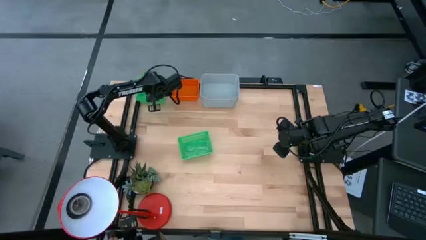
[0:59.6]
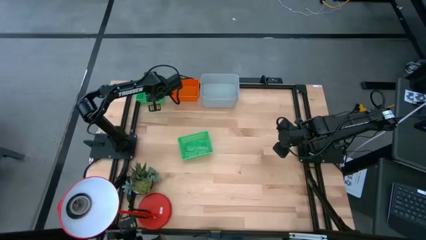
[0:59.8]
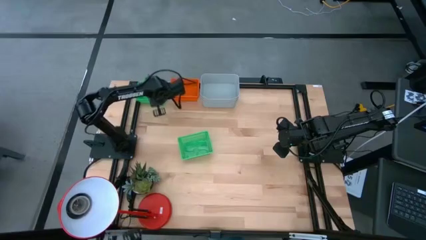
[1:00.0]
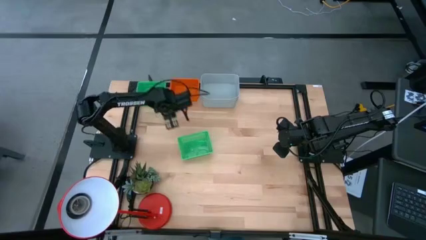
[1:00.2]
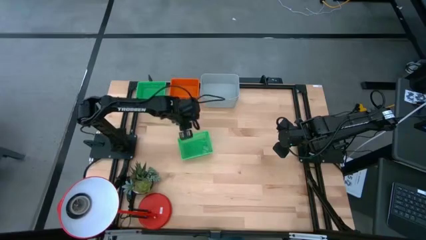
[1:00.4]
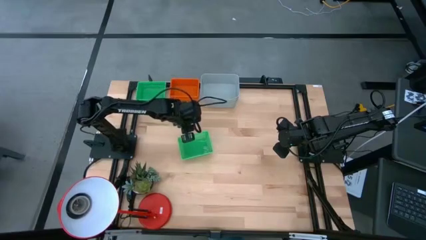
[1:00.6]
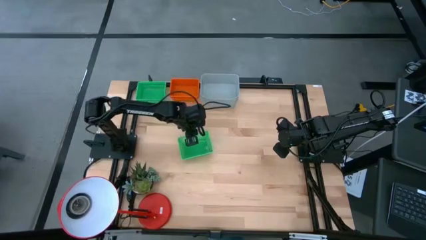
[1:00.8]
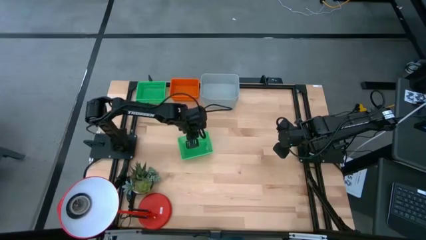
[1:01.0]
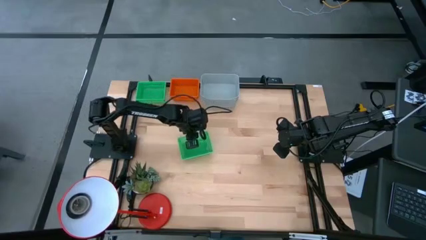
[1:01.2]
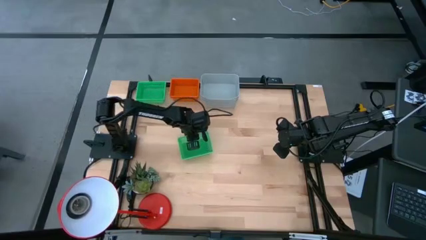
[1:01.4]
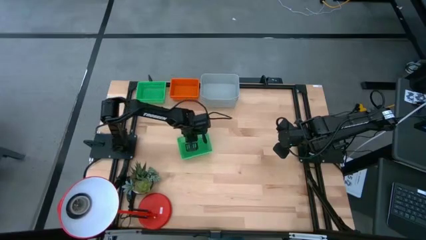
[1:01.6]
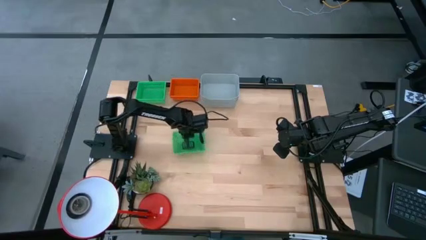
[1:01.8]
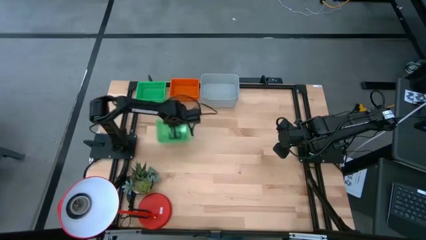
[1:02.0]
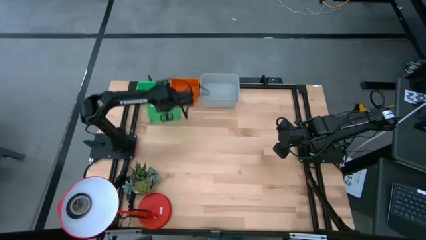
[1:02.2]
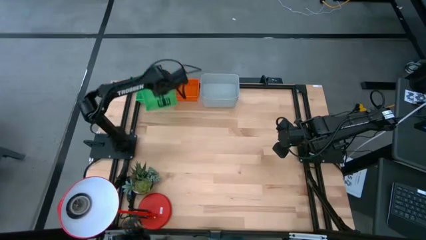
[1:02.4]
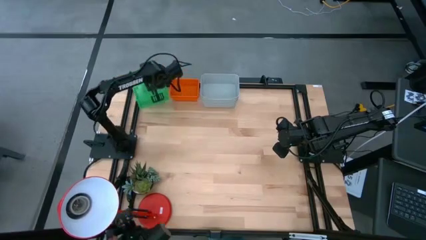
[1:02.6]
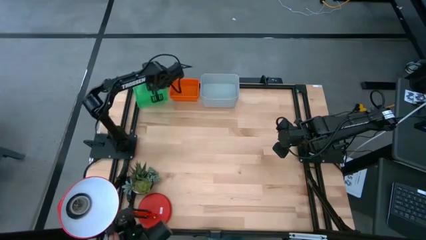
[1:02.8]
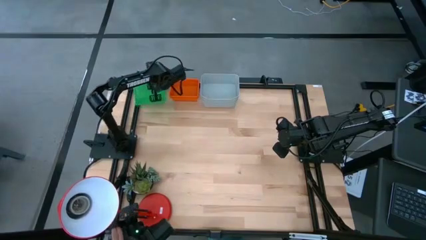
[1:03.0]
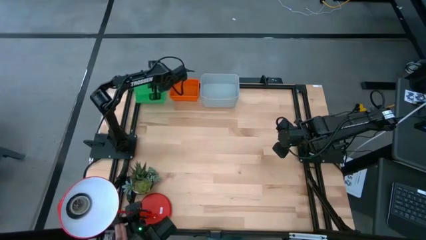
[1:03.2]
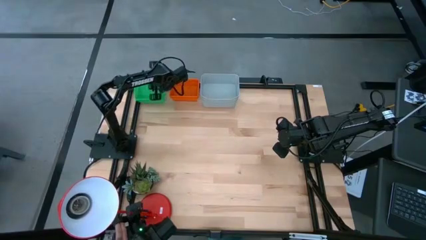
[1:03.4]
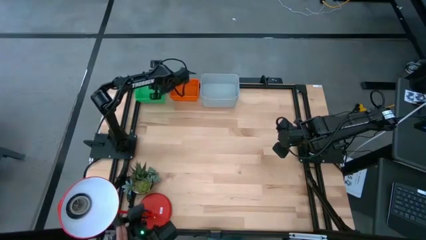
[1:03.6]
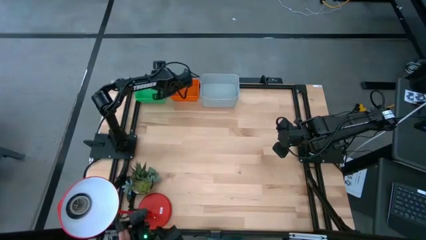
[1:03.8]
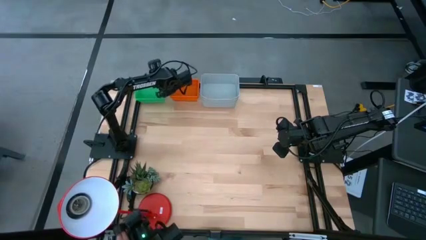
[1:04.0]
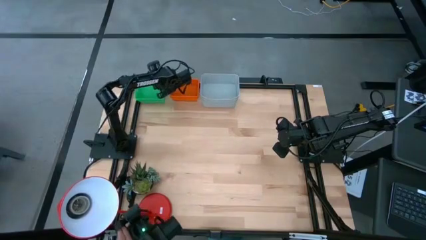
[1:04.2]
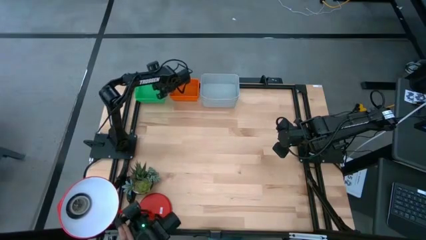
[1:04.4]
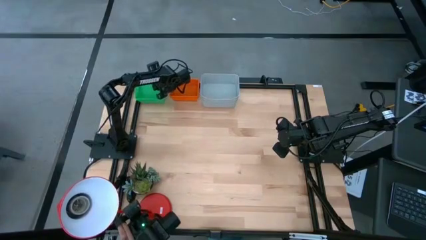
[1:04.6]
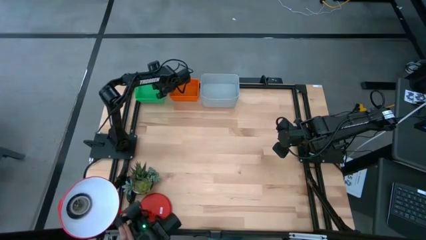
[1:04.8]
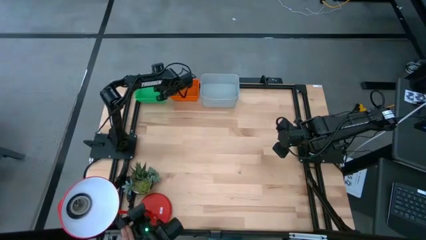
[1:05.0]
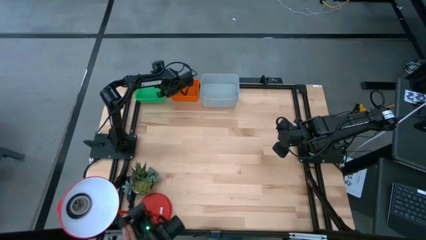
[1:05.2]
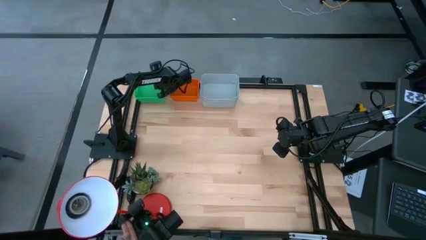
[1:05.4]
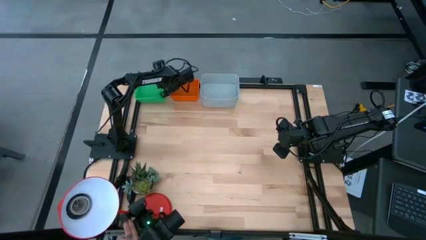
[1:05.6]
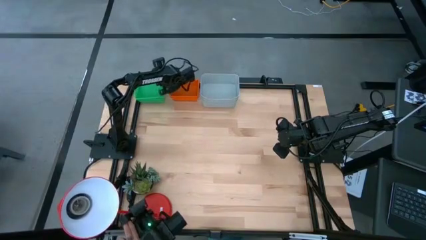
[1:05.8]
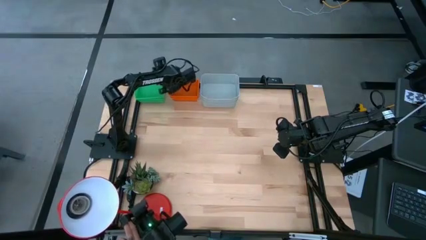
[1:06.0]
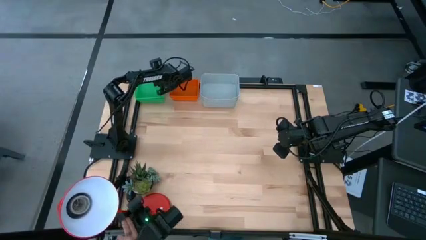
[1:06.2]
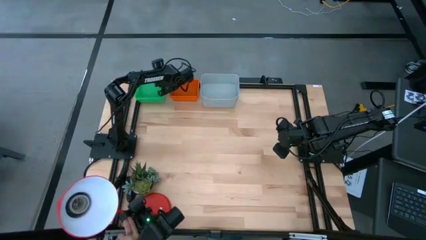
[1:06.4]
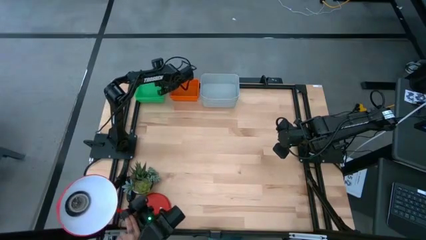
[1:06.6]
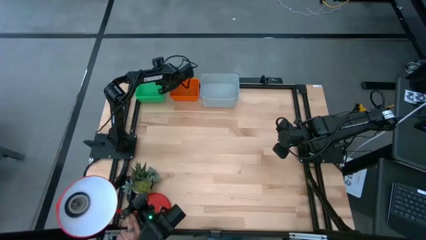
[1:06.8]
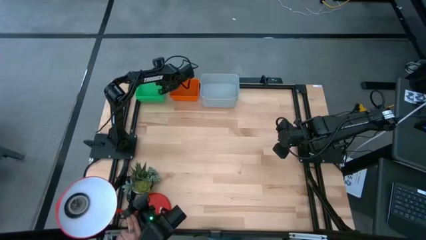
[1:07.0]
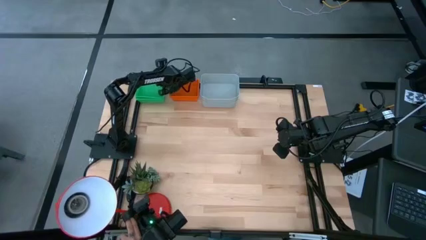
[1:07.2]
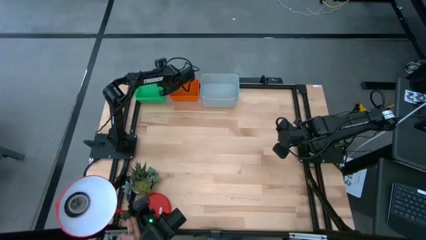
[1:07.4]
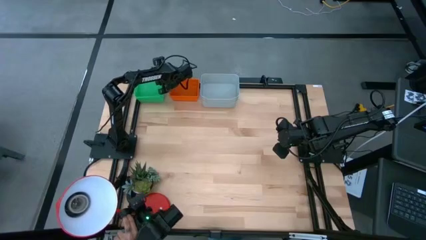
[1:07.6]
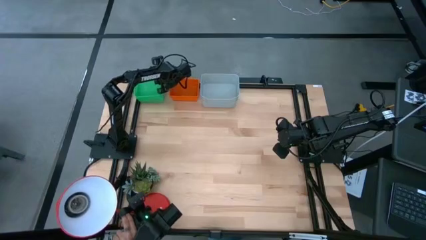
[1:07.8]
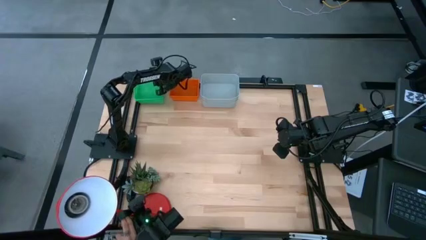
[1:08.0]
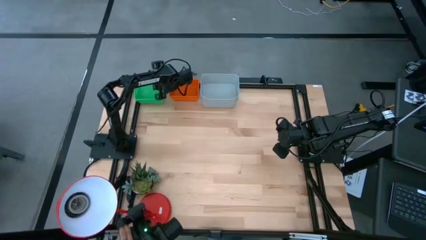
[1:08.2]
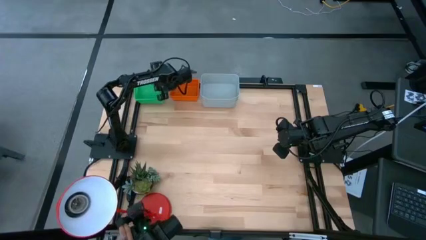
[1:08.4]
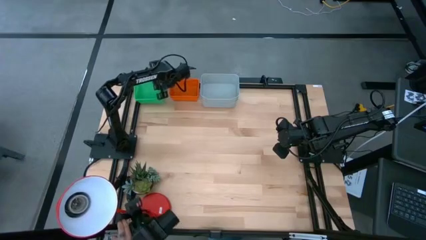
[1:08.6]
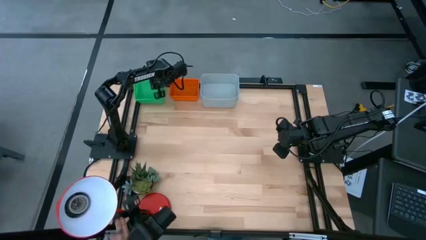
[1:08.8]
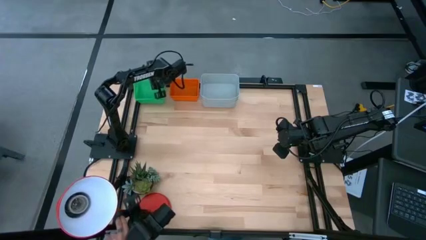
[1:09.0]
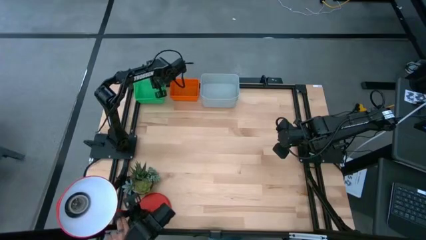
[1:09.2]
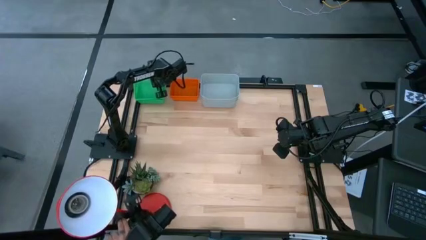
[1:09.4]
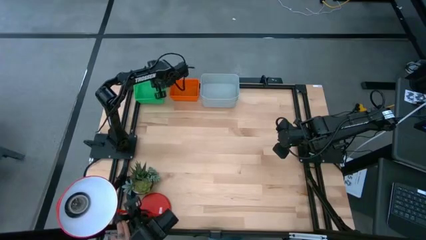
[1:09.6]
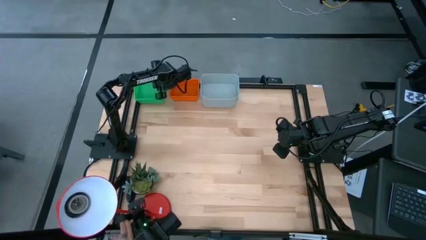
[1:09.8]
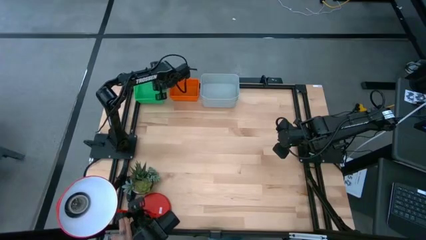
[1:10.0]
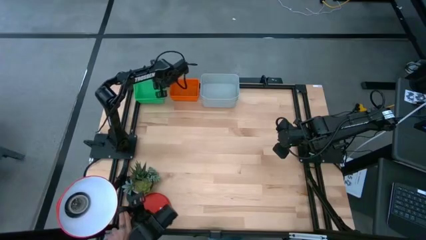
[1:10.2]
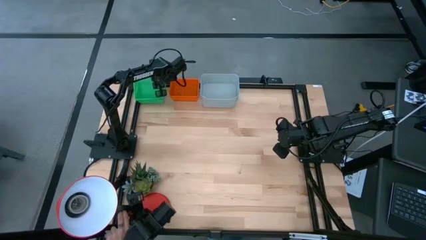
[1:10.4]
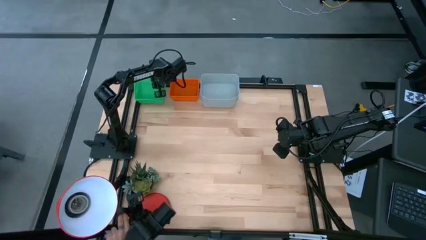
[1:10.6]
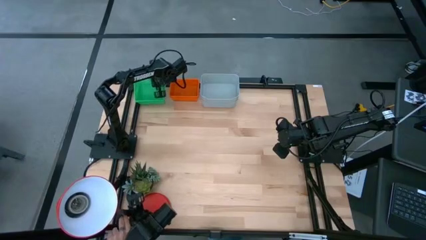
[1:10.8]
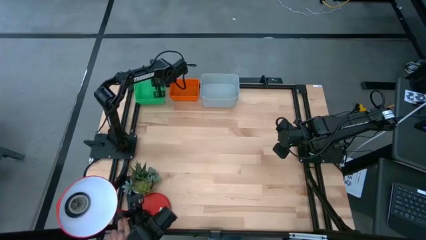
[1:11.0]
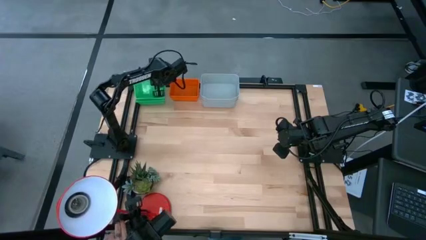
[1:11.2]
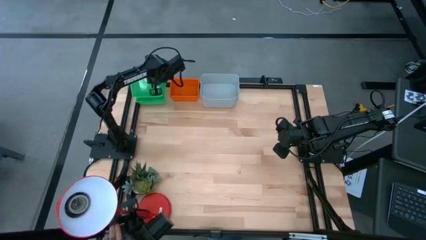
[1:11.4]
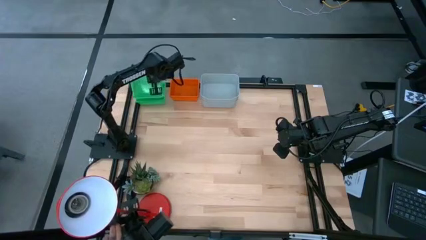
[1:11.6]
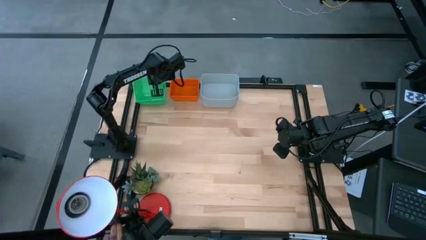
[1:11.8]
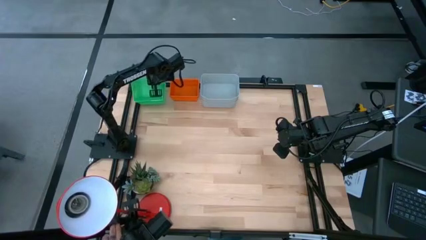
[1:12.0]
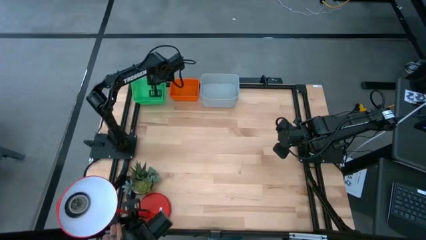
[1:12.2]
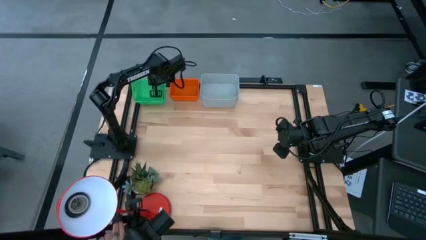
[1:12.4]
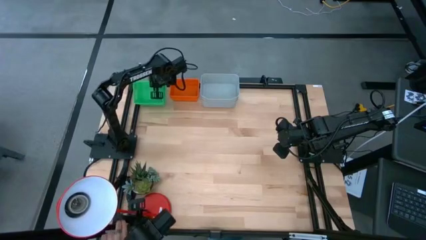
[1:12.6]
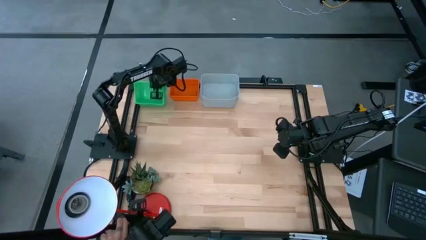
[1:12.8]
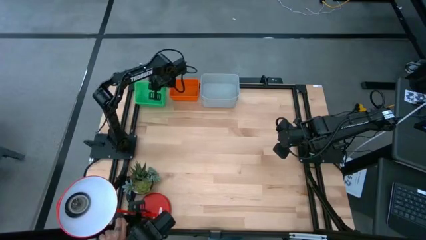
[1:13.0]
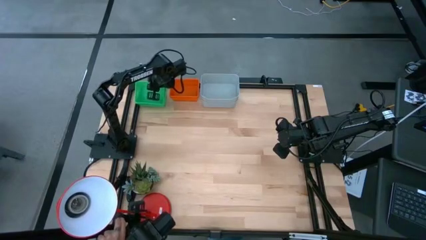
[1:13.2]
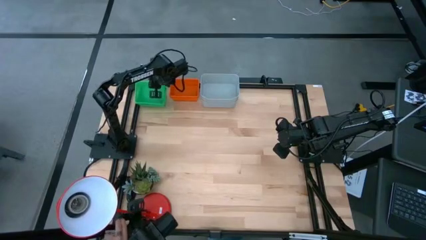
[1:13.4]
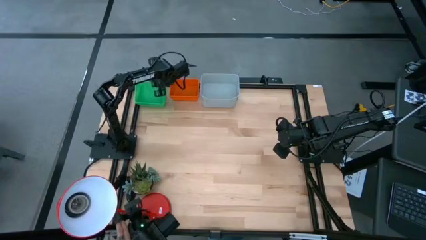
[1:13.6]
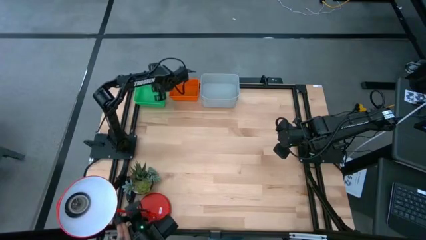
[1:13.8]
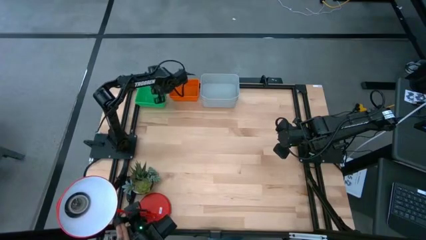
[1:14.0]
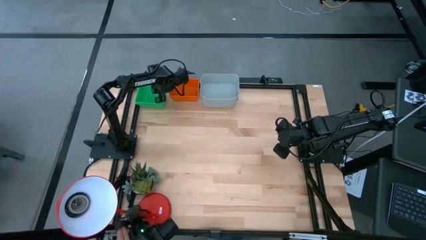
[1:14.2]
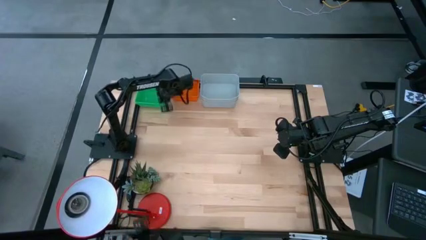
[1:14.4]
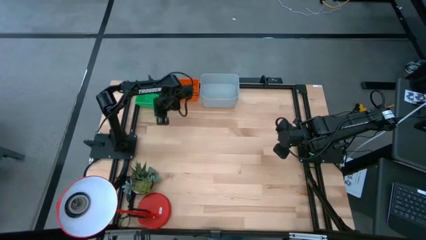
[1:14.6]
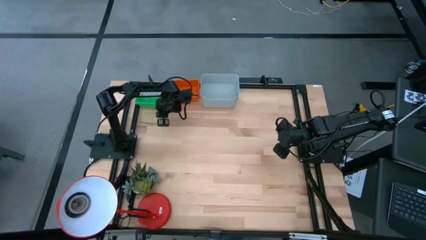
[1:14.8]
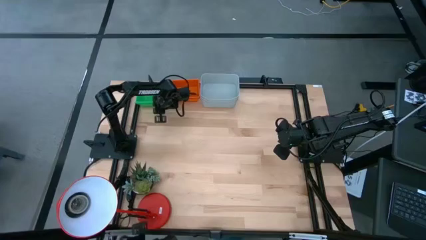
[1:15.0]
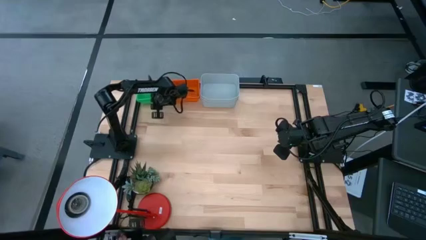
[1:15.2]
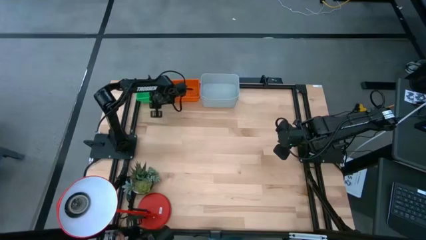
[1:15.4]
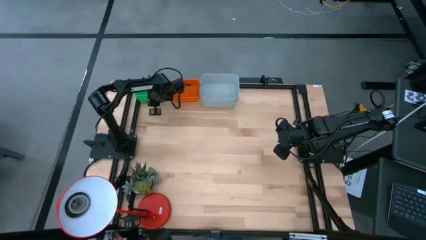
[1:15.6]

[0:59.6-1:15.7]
Stack the bottom green bin on the top green bins
